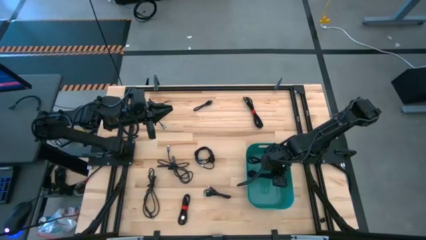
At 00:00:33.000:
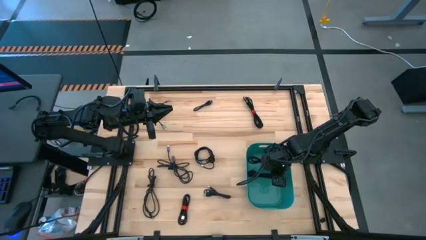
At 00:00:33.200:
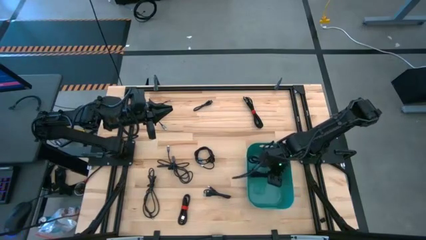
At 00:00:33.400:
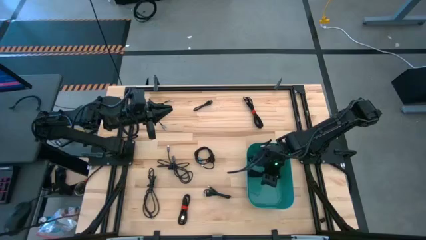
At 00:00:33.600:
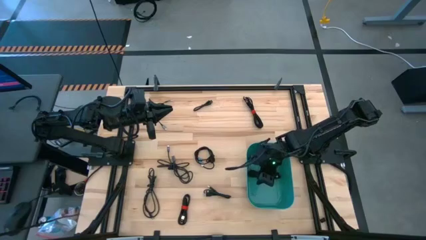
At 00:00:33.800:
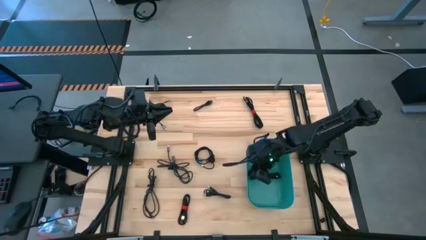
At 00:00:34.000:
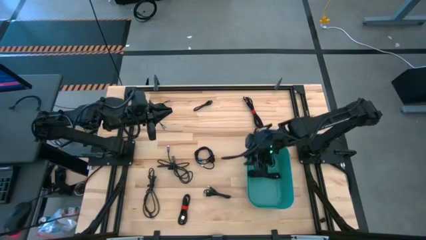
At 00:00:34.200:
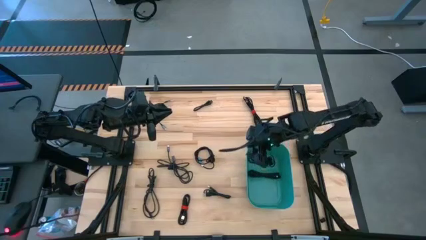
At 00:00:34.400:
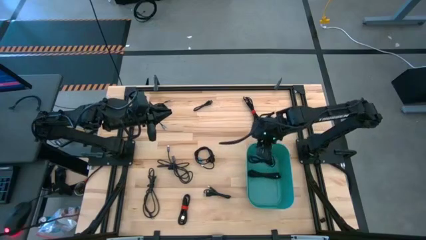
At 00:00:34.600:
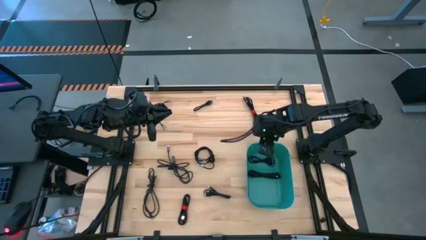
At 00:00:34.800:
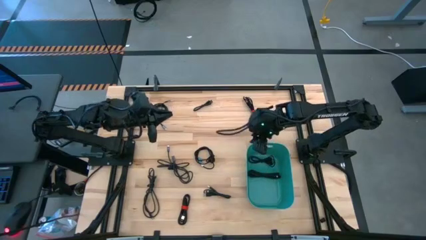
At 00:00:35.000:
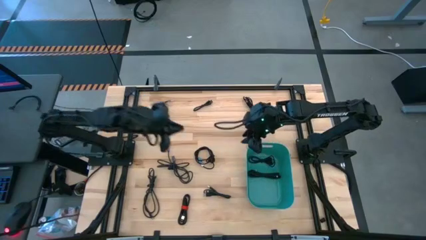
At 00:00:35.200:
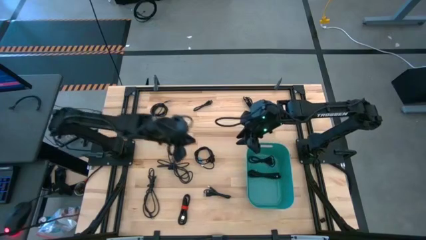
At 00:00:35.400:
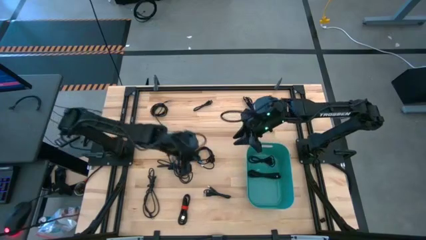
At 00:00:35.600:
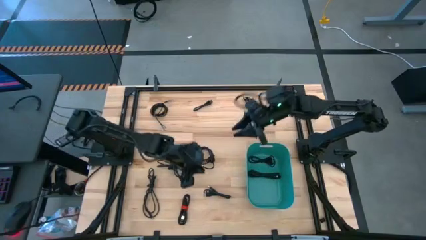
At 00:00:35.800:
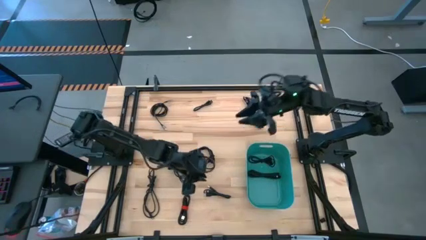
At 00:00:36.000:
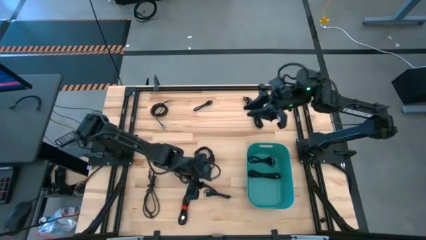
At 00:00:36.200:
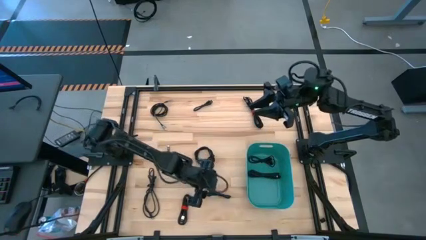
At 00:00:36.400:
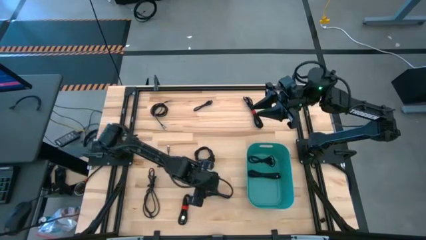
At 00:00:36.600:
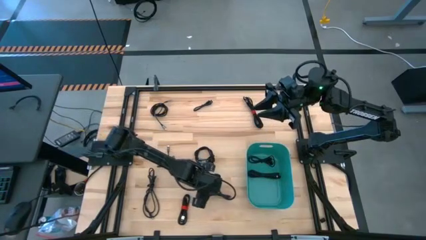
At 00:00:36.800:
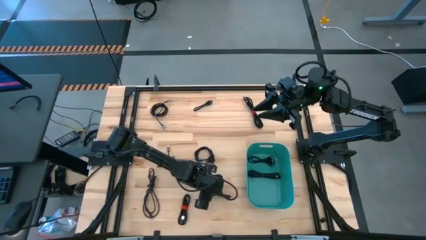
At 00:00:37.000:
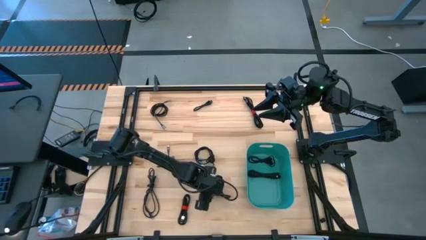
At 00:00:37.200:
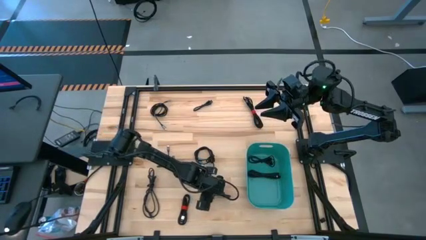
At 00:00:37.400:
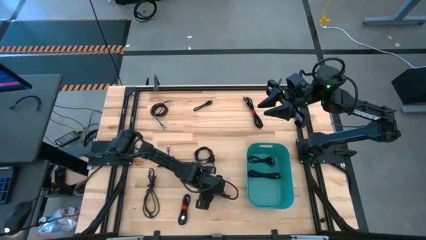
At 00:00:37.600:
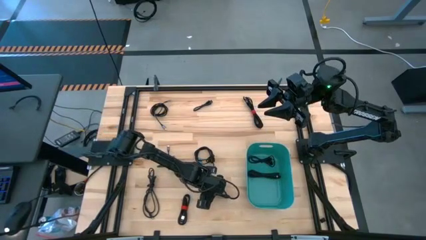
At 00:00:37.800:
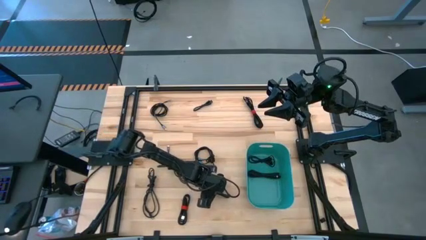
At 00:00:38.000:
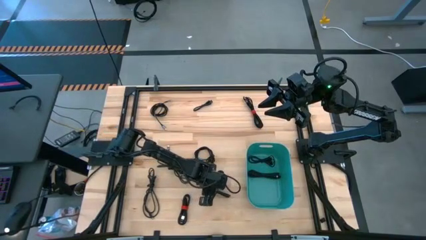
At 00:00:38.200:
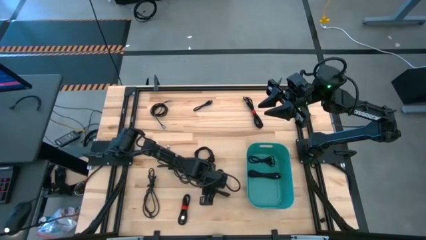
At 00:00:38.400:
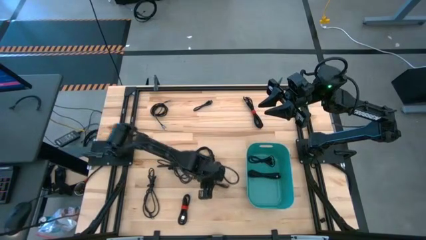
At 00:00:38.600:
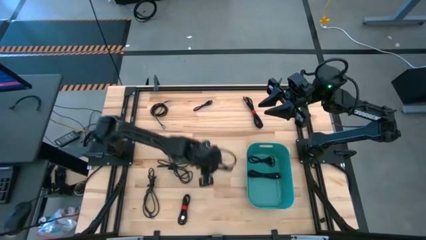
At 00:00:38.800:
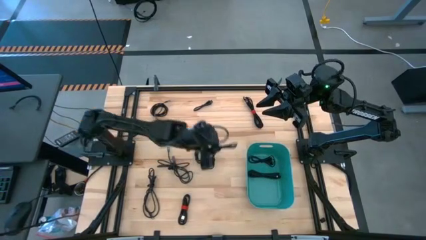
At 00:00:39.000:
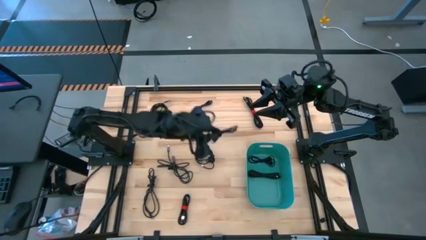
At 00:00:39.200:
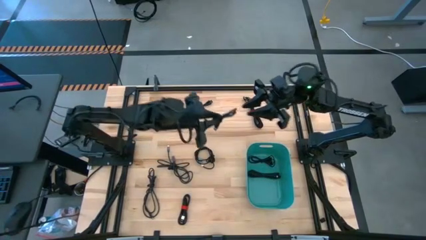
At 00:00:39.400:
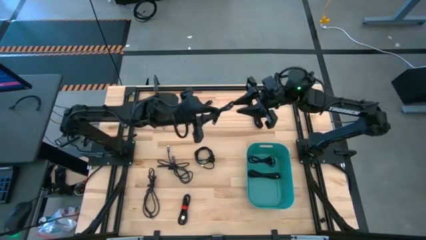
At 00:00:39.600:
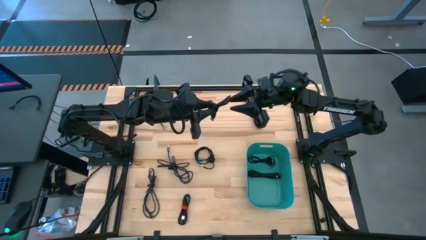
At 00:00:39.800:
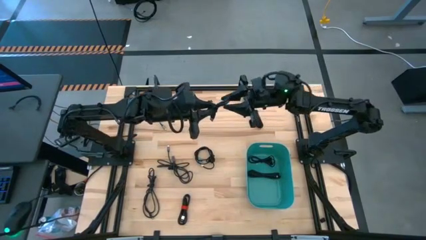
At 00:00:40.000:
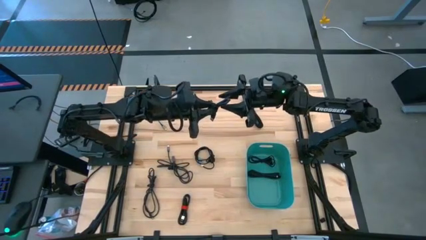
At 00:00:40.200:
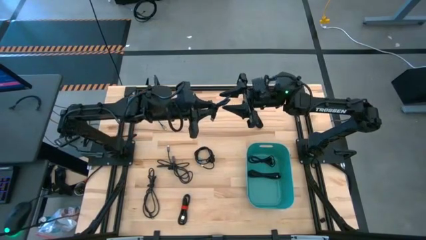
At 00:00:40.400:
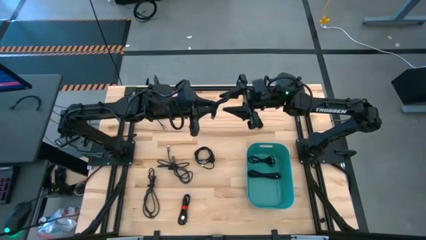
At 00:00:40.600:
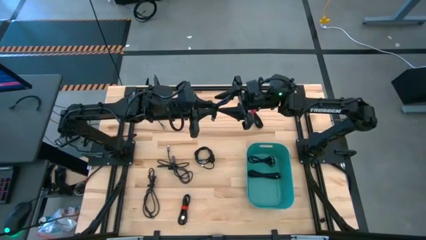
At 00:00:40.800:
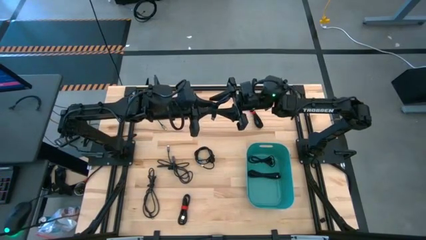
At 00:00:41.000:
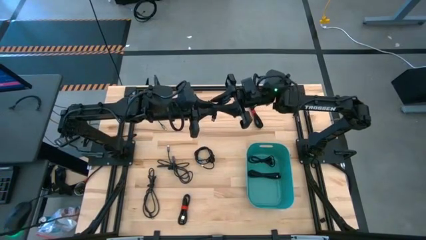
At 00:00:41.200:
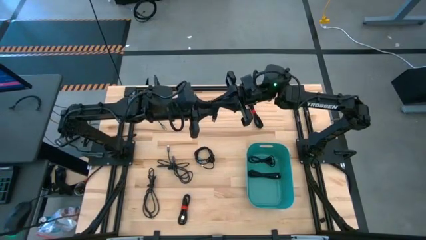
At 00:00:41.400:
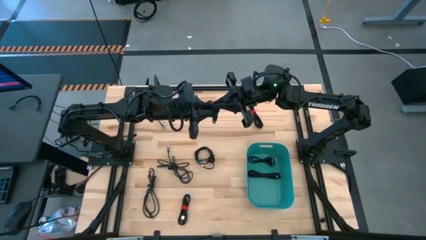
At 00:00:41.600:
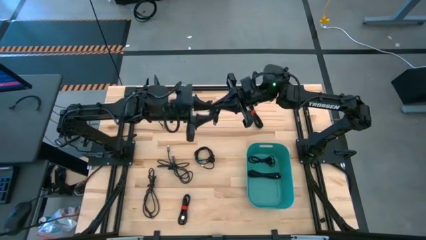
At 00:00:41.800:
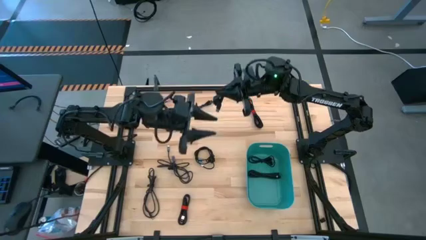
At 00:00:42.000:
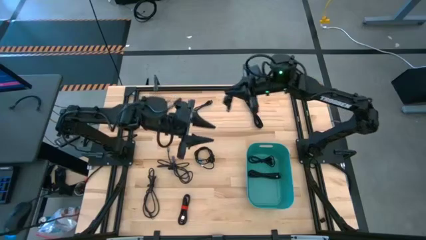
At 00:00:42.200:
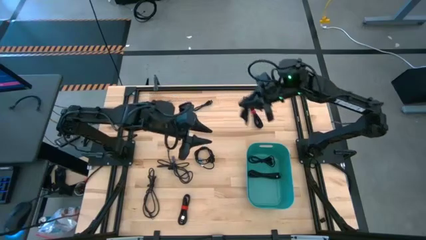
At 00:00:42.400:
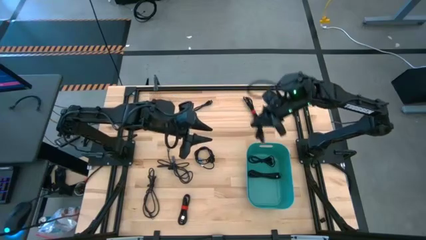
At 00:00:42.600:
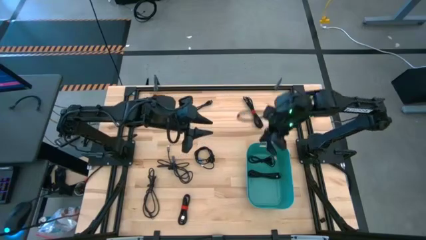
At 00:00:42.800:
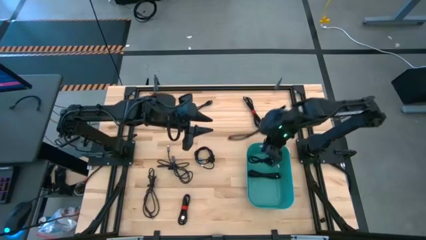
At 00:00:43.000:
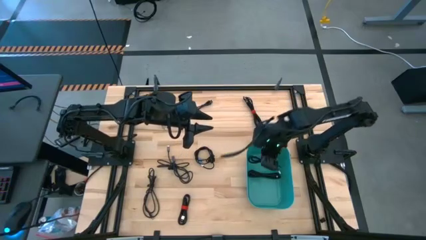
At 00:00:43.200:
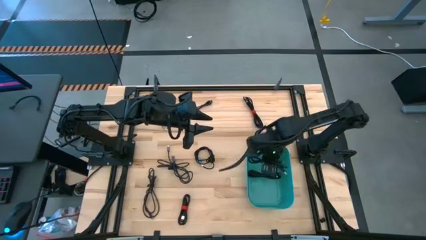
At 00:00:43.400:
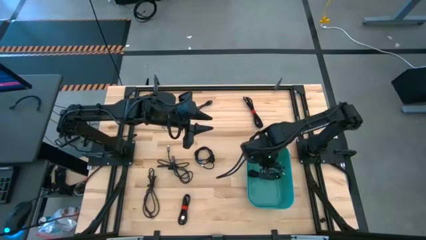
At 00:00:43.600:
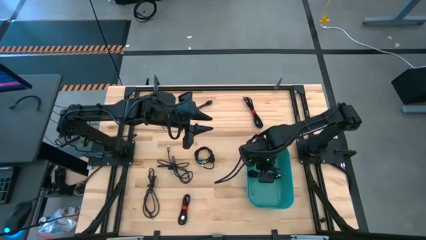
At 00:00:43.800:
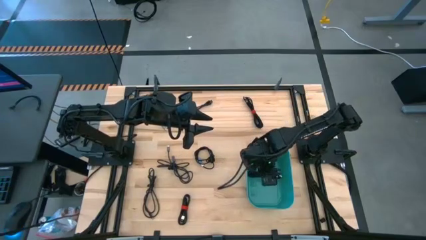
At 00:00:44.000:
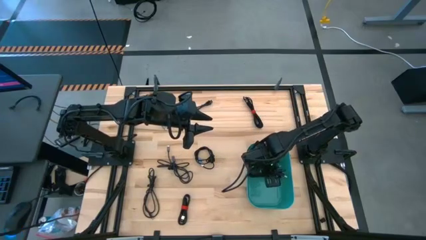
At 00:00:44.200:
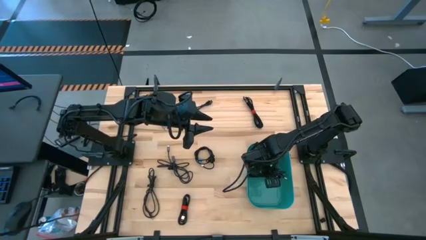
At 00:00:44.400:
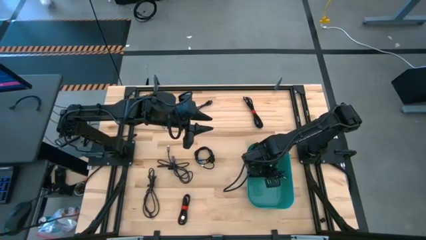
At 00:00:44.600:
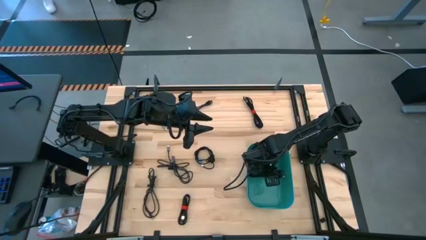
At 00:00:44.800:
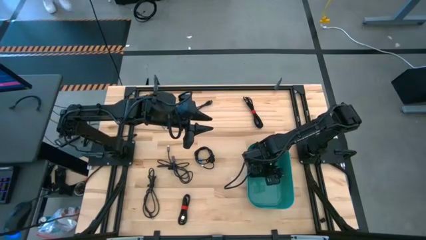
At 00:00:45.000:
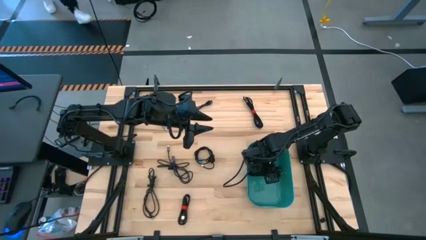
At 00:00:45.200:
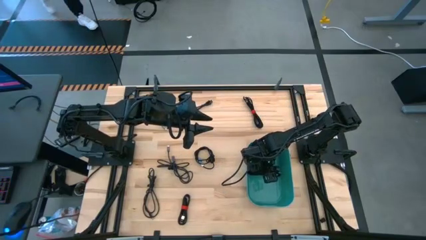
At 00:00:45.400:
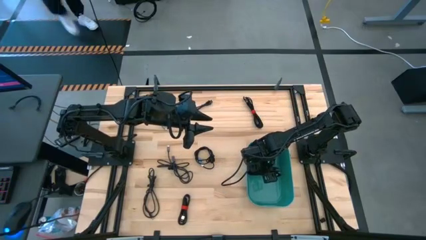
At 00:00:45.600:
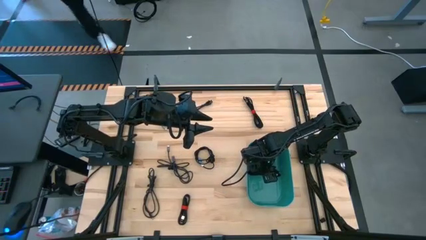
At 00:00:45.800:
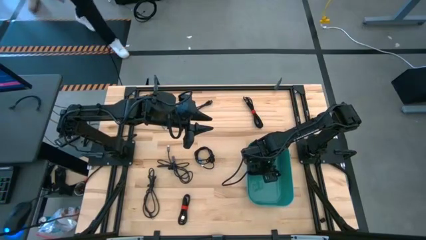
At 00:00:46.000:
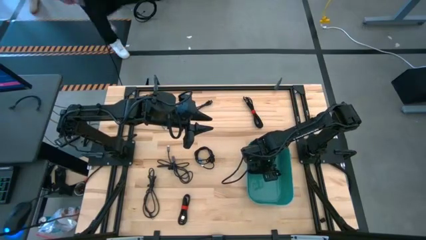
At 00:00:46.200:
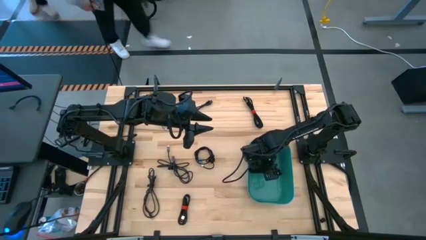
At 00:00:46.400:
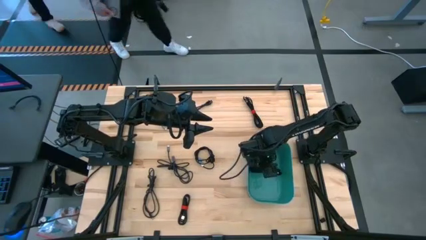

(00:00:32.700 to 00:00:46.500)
Task: Pick and place USB-C Cables
Put the black charger cable into the green bin

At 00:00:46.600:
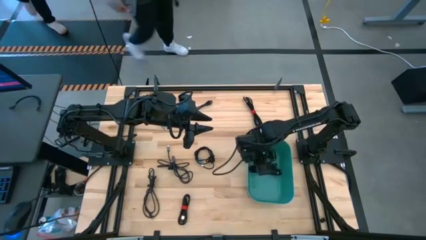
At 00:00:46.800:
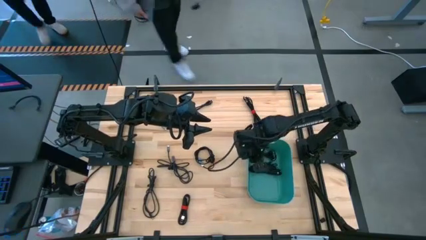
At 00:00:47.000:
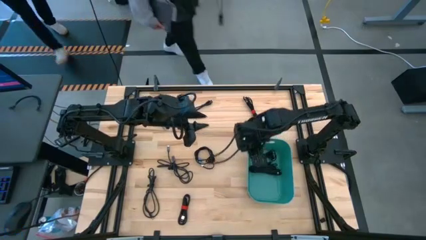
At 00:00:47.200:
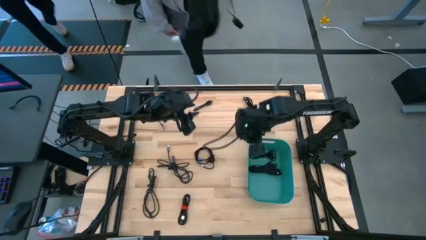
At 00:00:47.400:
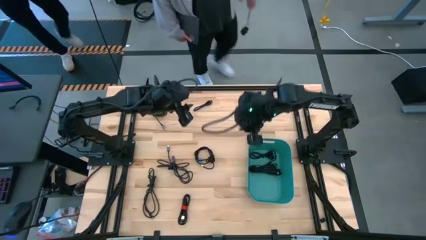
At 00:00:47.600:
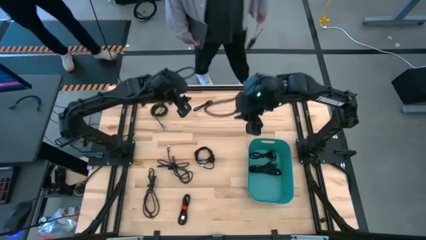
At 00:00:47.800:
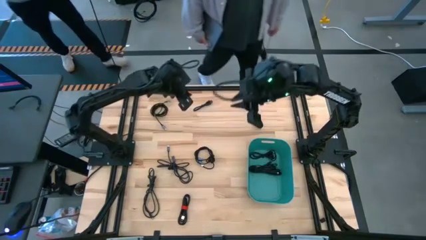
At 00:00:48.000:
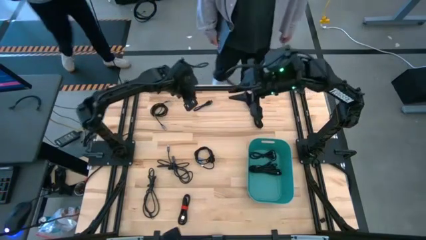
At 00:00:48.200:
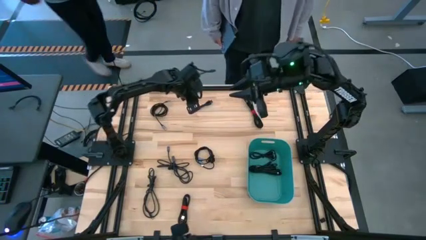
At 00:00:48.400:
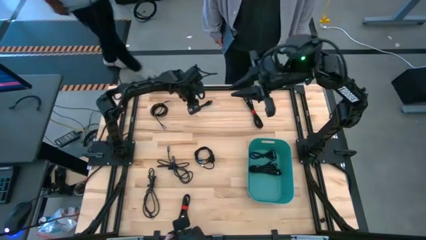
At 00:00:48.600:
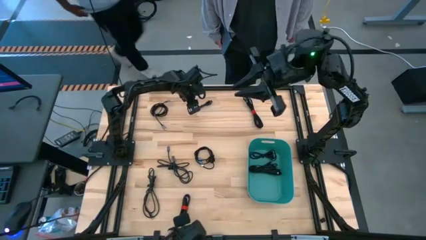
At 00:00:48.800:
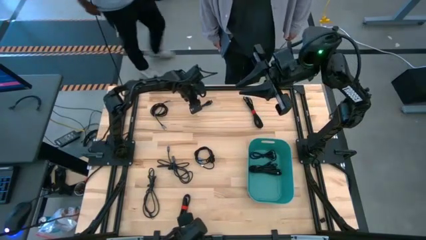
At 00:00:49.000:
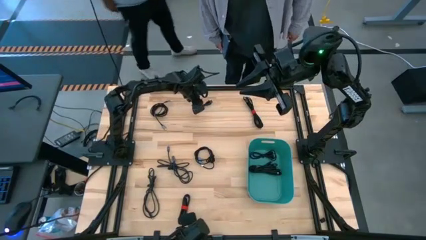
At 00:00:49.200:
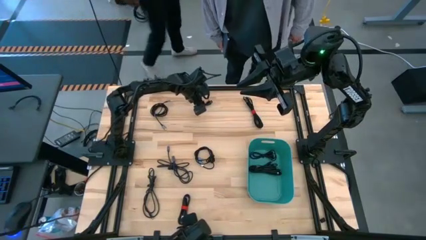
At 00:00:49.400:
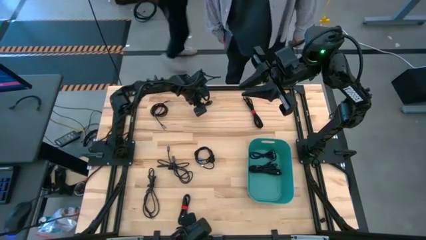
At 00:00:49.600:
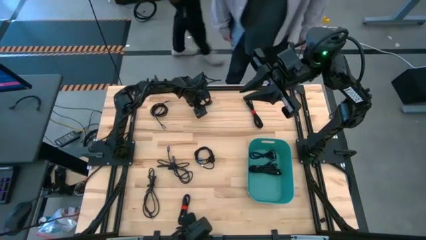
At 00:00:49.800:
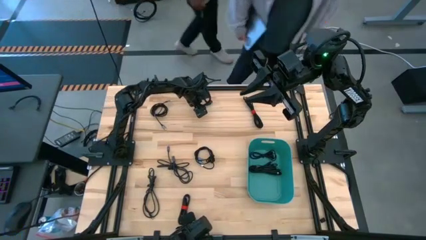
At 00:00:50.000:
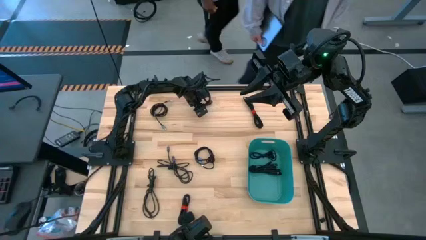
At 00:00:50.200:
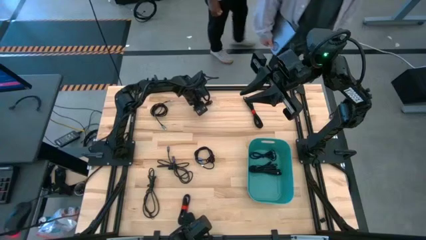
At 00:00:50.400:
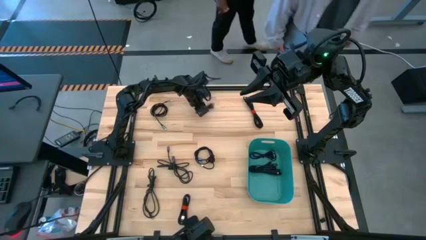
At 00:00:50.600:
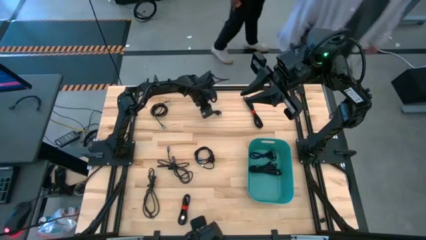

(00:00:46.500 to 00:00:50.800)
Put the black charger cable into the green bin
